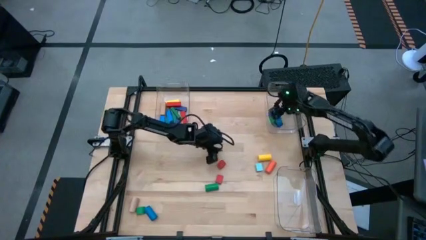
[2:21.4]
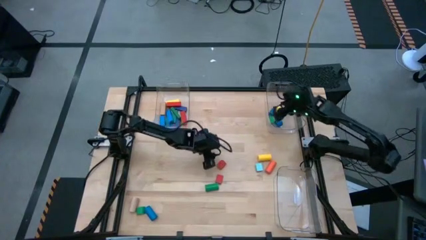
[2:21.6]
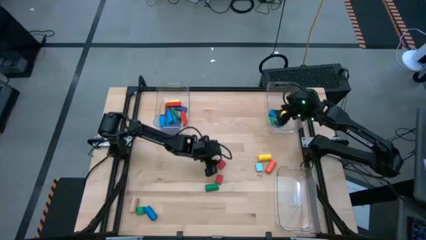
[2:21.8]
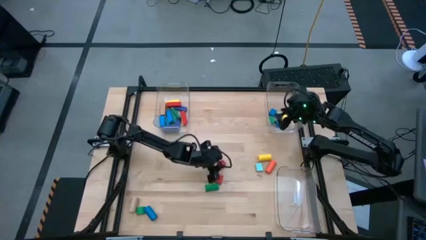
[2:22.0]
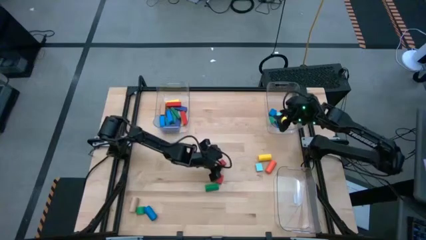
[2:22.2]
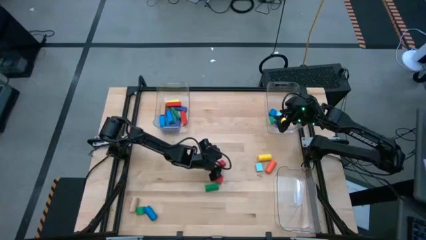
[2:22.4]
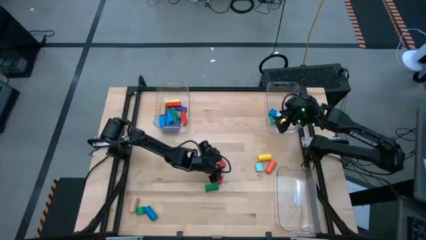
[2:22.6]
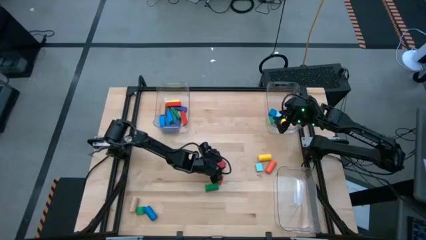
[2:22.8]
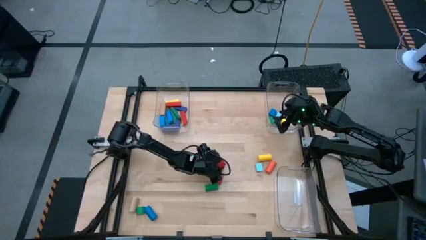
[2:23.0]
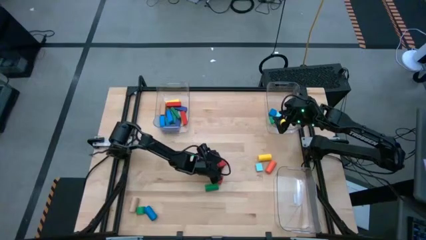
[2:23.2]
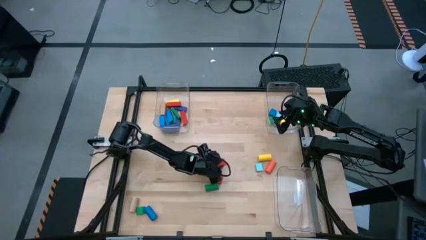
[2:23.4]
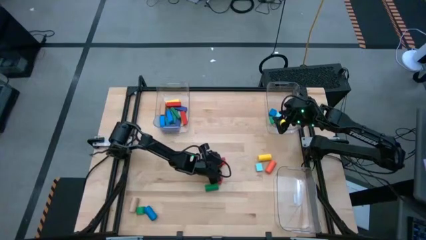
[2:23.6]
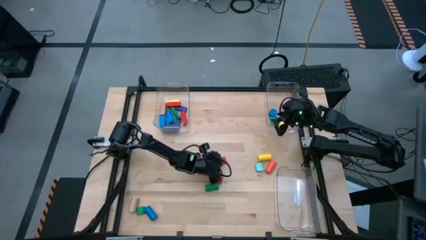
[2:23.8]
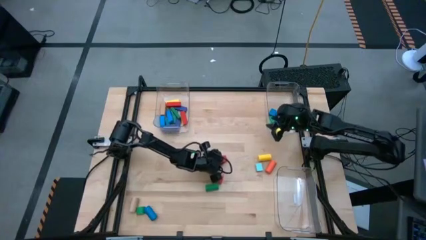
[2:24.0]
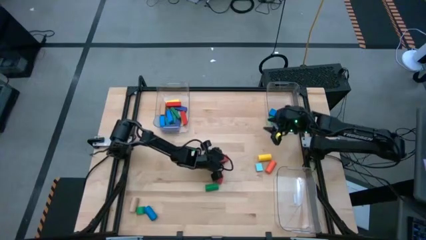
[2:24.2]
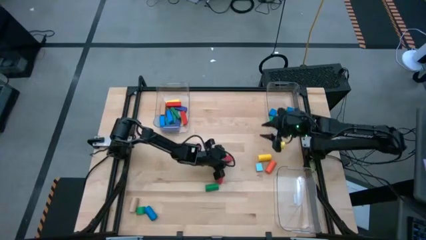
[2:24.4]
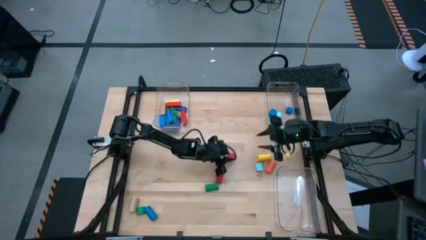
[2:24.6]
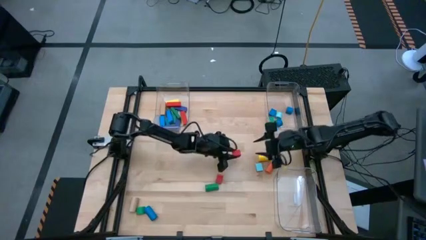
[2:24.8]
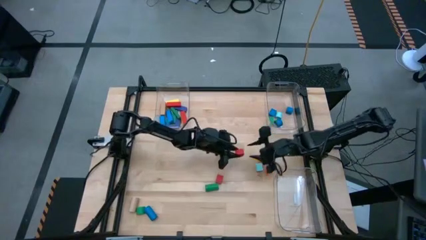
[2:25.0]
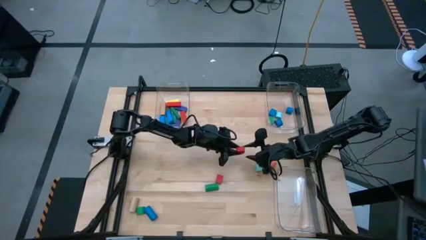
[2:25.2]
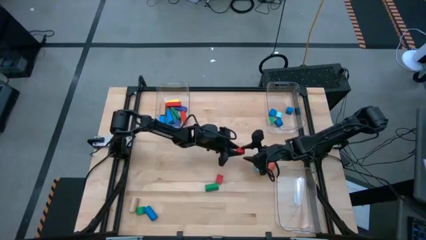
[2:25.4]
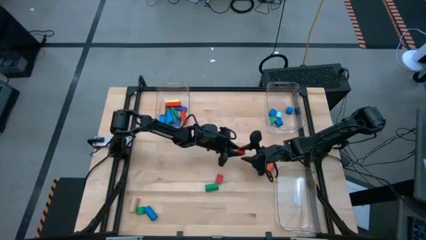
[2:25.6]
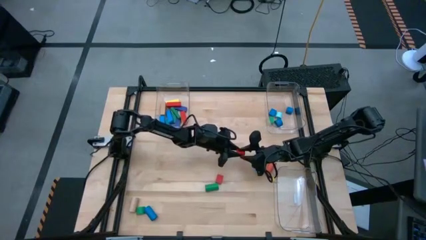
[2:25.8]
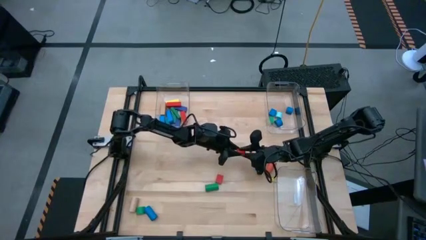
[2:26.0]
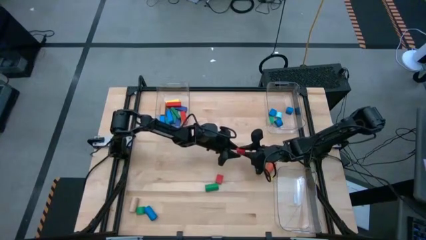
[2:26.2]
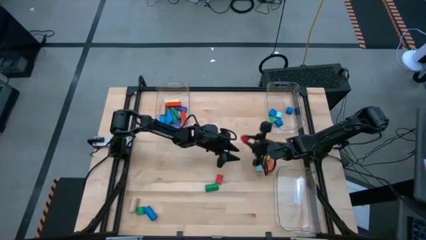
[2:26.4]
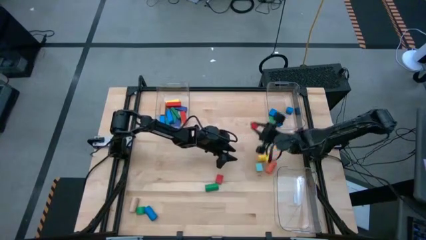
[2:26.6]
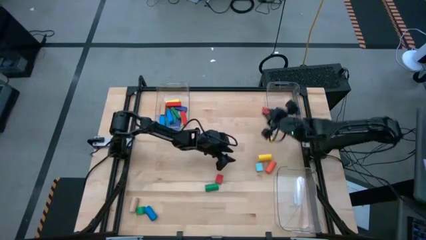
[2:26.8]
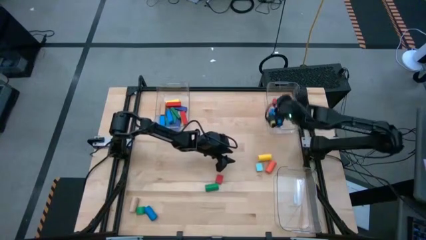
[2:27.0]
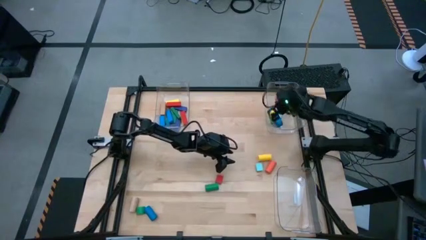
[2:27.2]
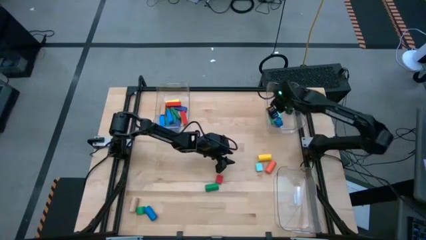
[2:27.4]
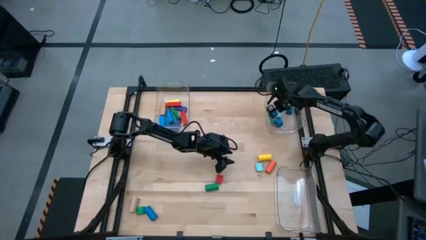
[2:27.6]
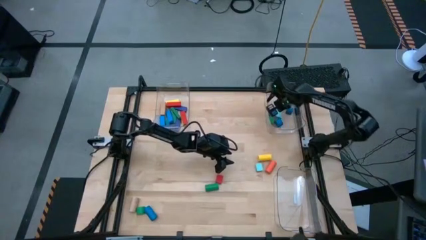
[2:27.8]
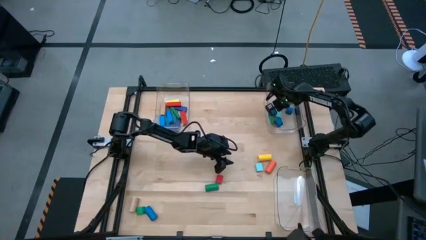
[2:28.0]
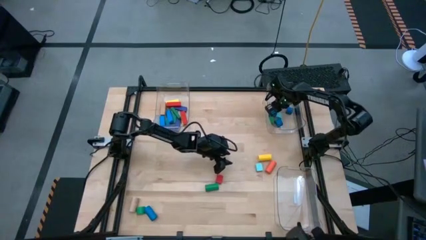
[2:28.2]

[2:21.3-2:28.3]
Task: Sort blocks by size
Put the red half-circle block into the top right transparent bin

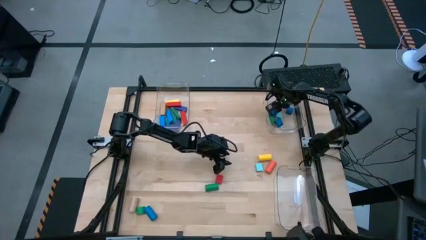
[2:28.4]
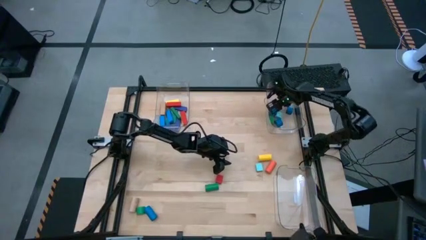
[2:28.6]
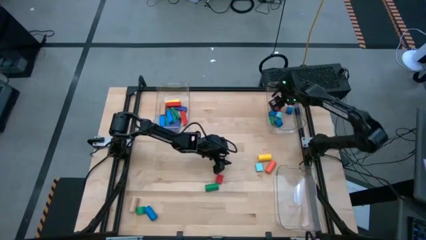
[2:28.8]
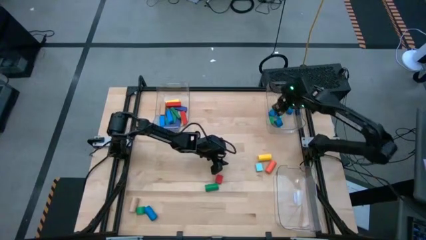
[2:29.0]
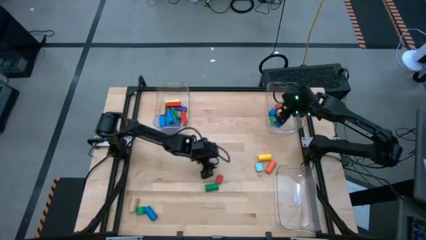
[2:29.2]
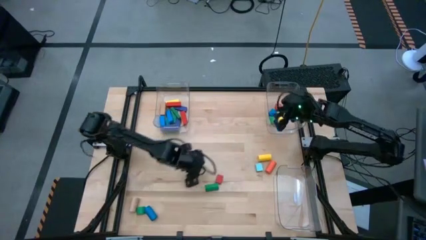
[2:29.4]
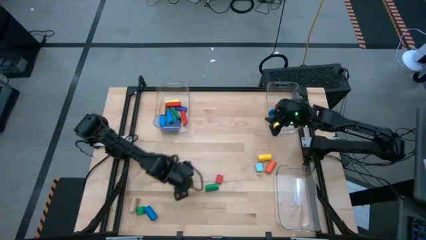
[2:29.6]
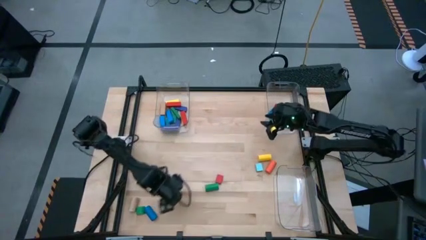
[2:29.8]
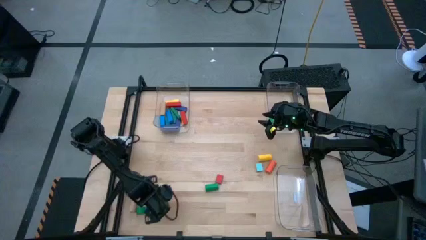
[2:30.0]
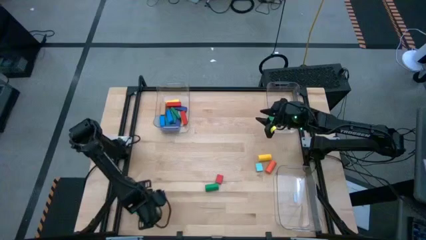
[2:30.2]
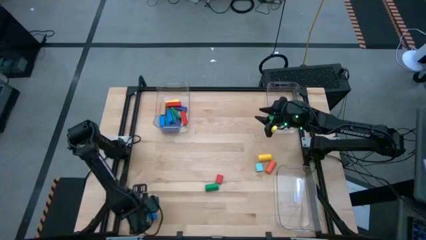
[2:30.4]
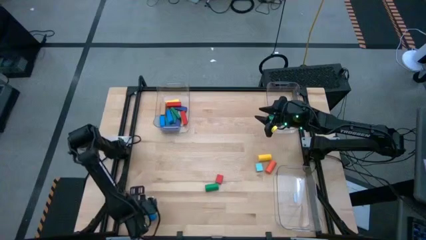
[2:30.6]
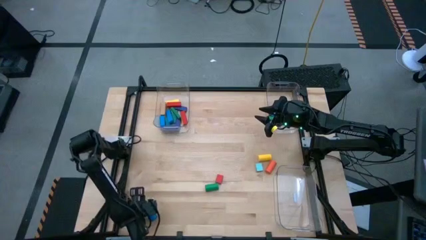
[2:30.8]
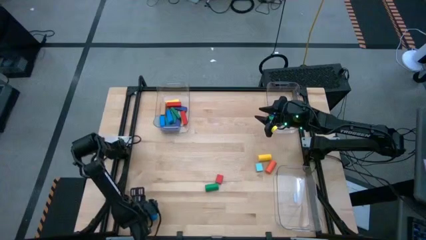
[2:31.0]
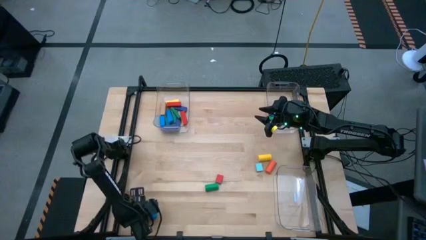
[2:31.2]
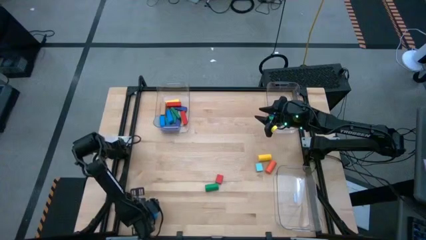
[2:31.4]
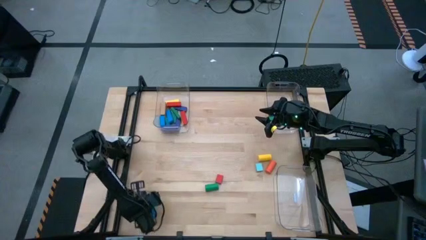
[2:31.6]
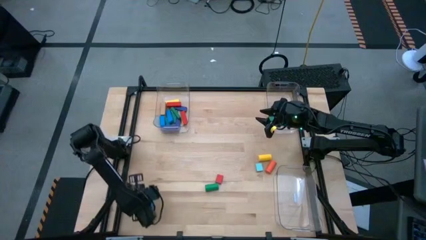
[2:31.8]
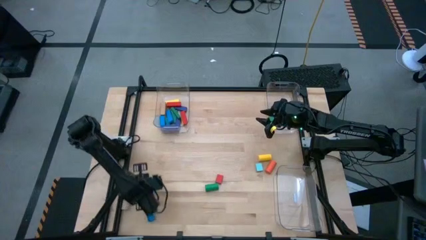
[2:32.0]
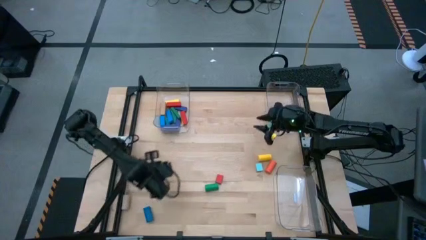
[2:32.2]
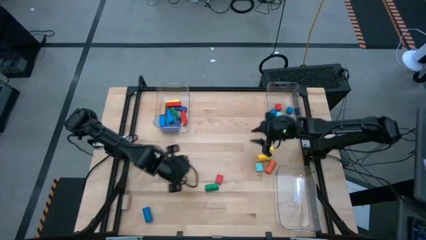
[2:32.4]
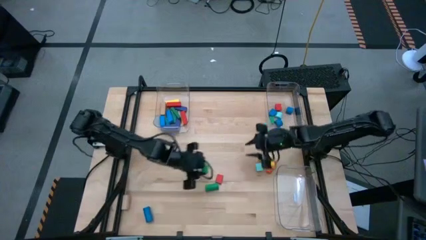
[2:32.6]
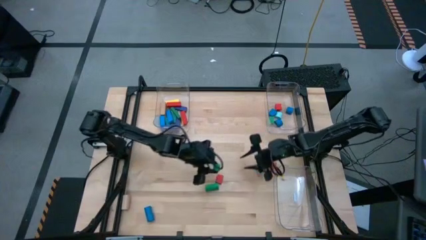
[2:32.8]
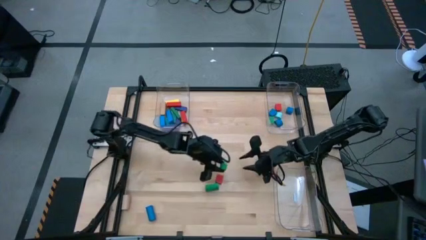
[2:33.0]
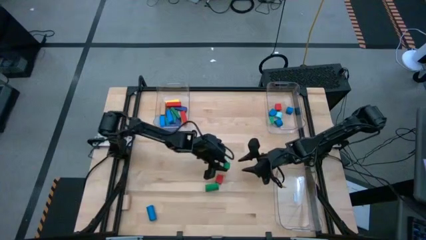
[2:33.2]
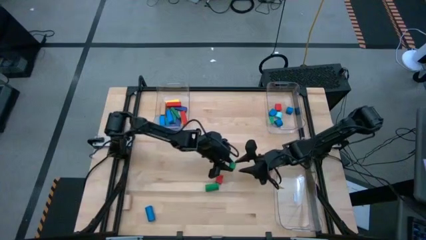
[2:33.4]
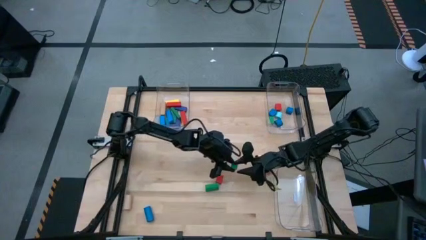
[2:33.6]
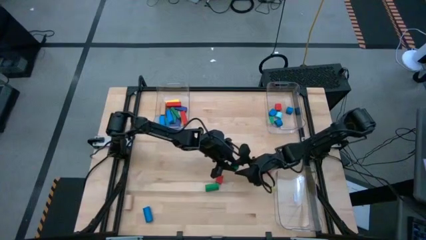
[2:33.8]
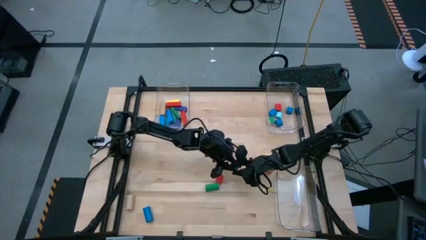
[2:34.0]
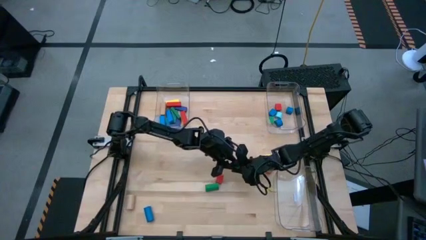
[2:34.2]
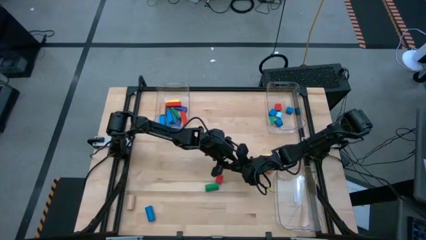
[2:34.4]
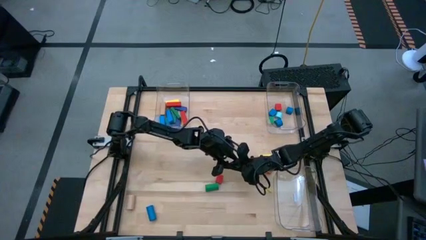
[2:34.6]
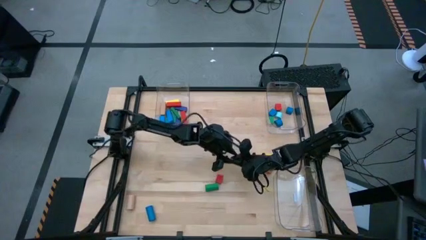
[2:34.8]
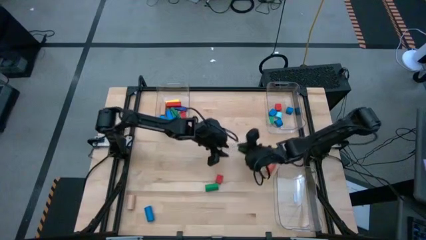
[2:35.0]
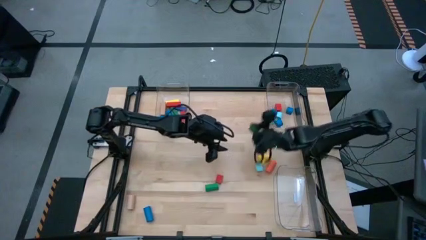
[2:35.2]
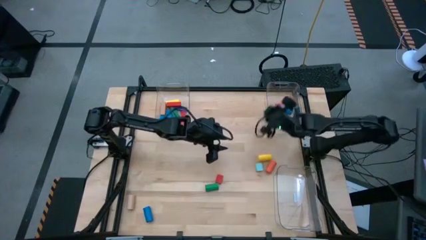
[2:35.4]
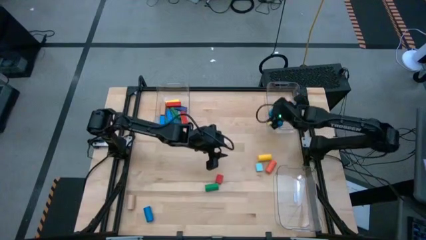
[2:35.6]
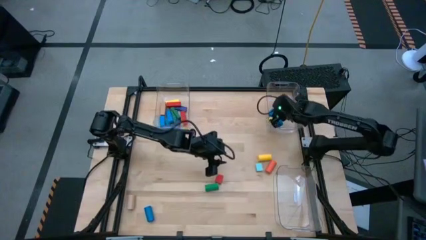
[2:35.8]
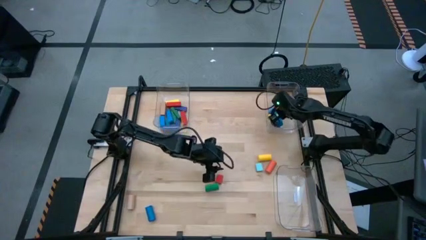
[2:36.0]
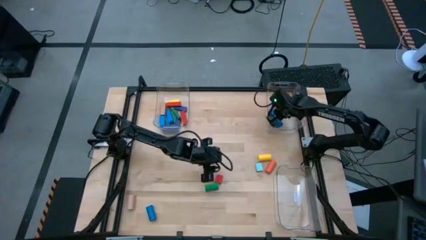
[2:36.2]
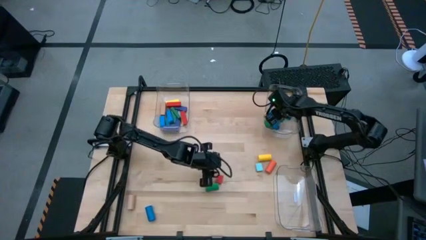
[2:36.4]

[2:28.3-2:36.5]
Put the green half-circle block into the top right transparent bin

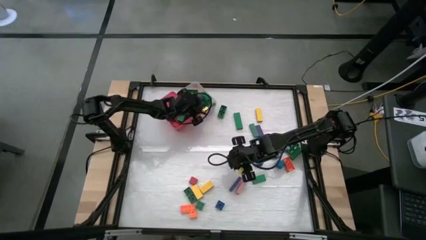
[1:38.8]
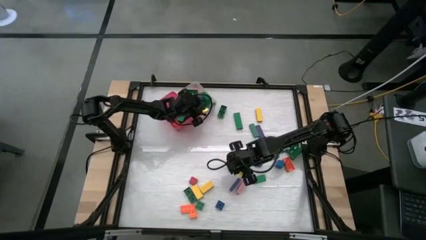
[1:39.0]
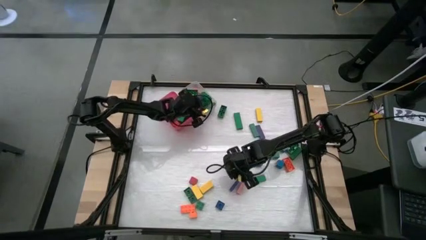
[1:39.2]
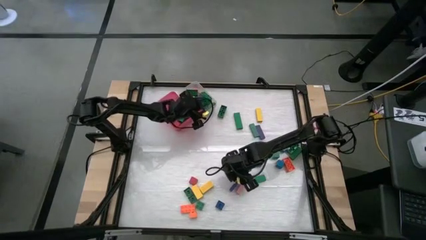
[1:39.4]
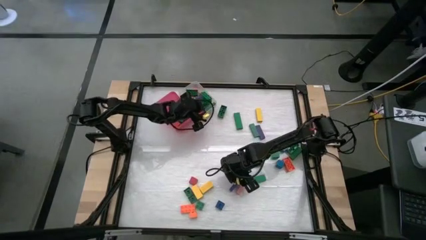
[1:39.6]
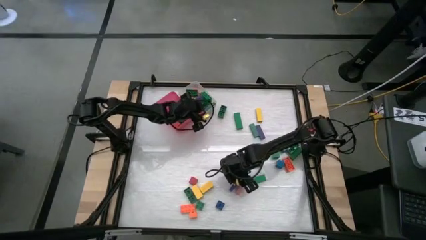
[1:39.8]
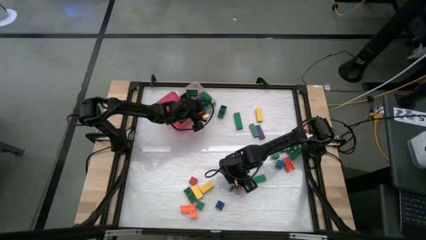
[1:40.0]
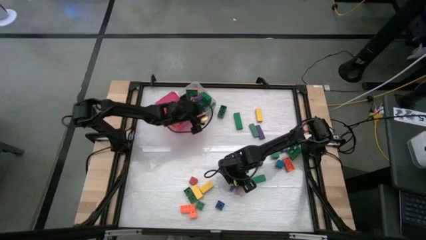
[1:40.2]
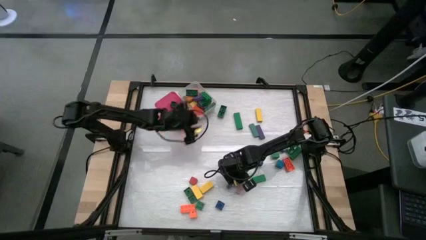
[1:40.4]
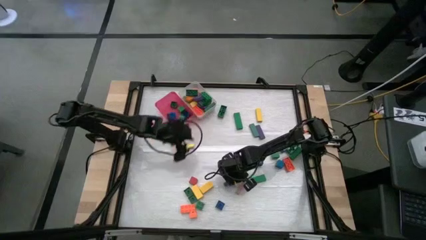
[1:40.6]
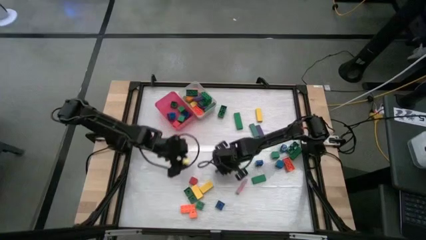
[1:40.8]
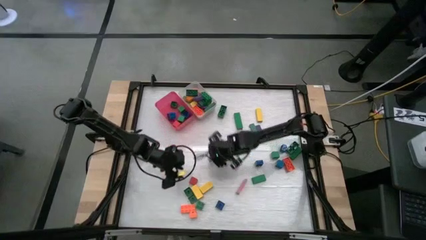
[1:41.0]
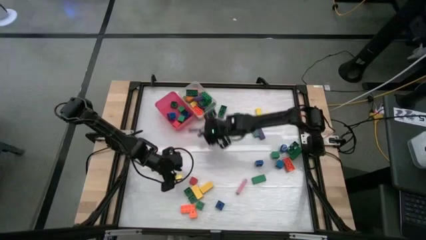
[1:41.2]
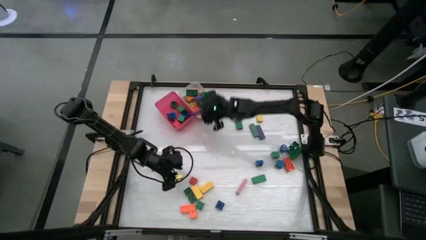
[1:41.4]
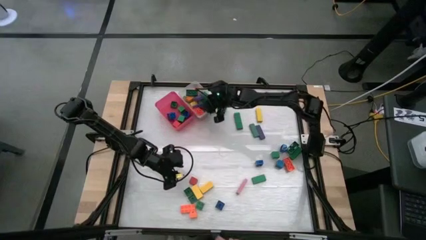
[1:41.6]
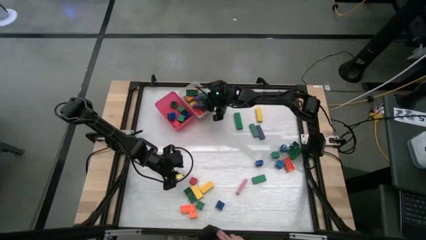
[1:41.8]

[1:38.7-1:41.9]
Task: Sort blocks by size
Put the big purple block into the white bin
